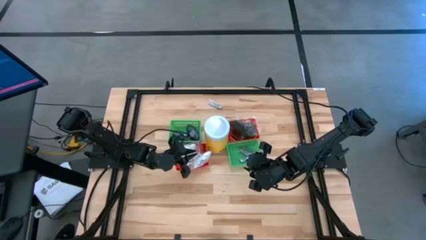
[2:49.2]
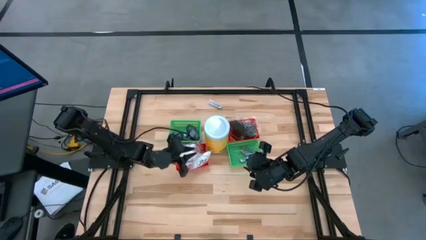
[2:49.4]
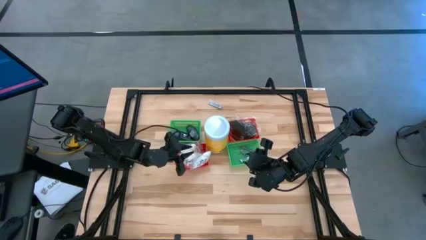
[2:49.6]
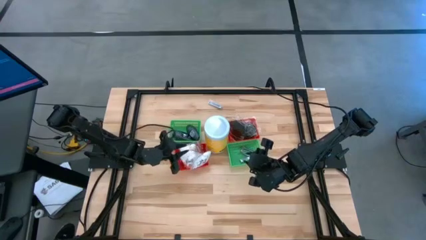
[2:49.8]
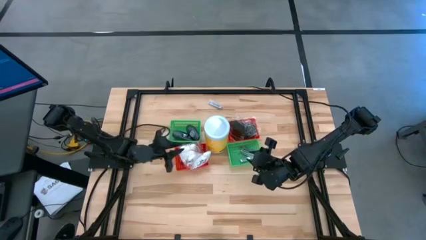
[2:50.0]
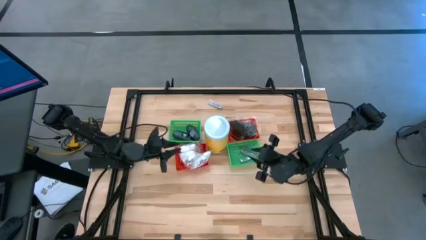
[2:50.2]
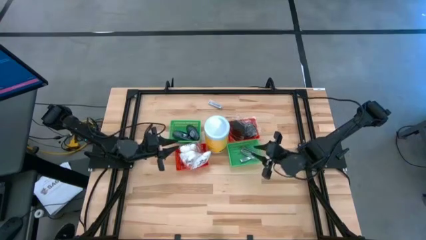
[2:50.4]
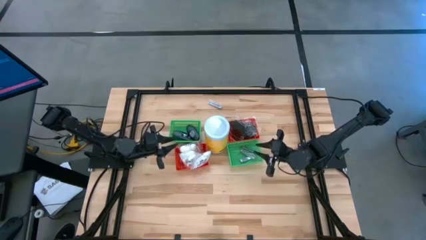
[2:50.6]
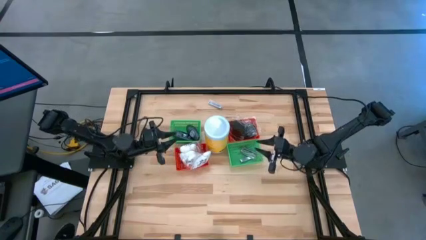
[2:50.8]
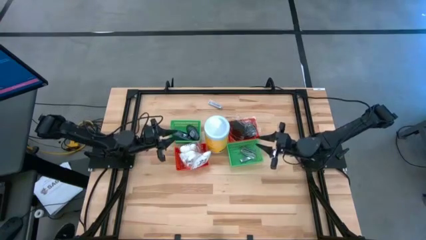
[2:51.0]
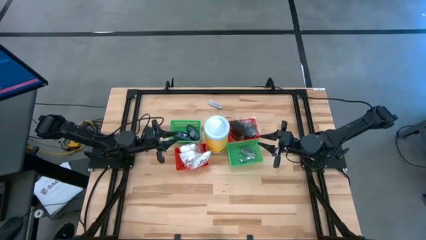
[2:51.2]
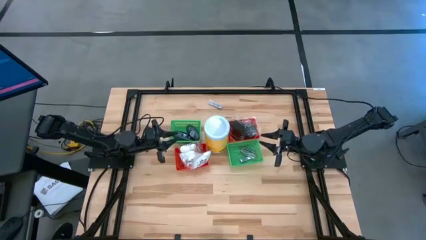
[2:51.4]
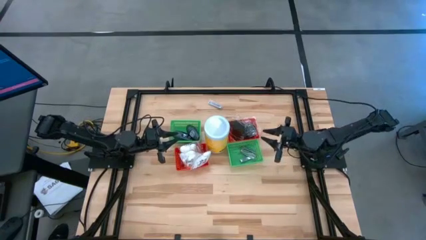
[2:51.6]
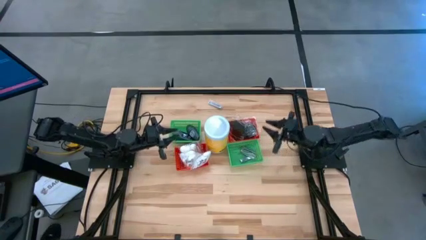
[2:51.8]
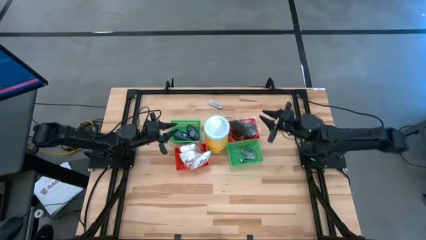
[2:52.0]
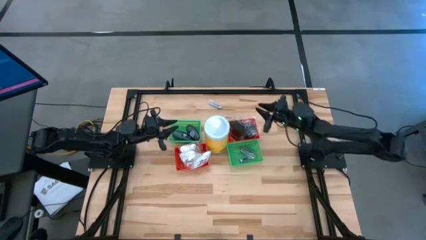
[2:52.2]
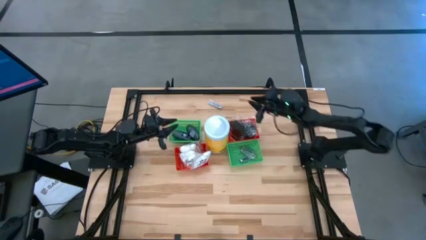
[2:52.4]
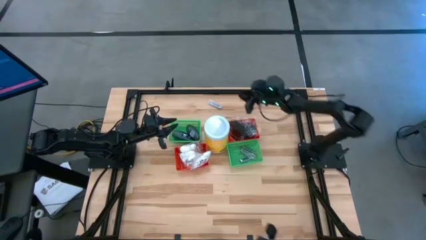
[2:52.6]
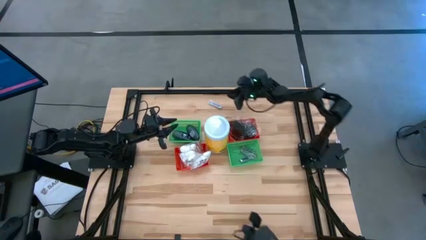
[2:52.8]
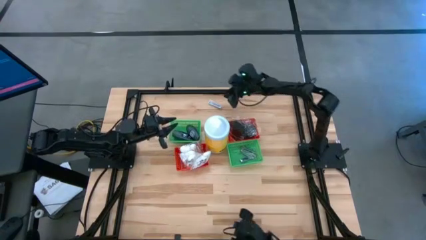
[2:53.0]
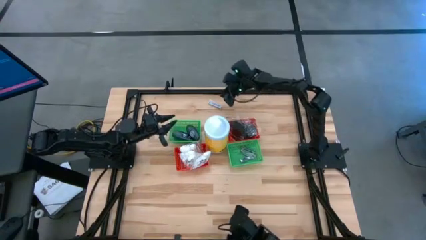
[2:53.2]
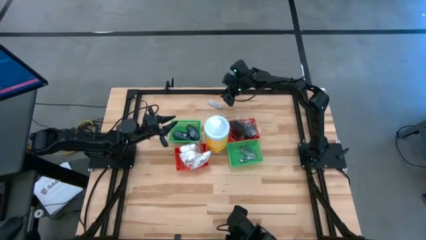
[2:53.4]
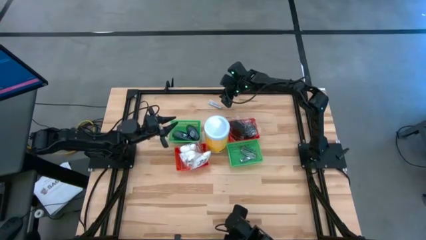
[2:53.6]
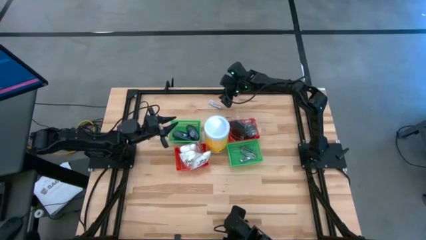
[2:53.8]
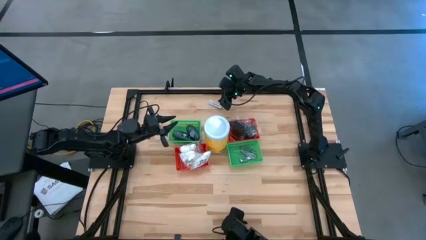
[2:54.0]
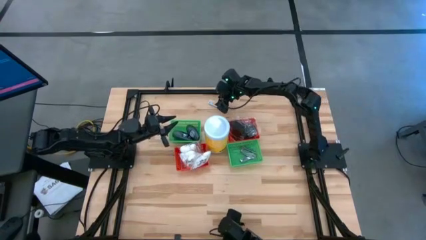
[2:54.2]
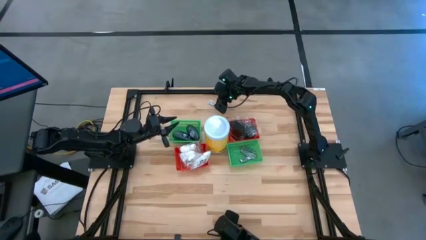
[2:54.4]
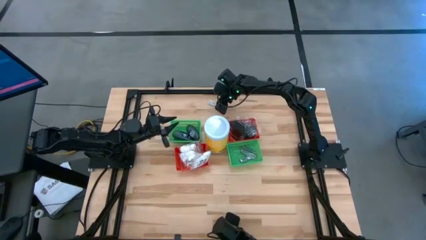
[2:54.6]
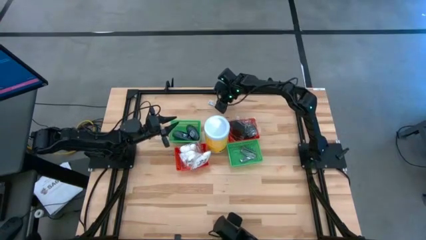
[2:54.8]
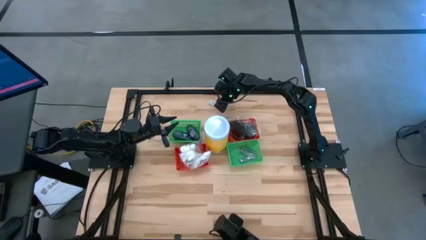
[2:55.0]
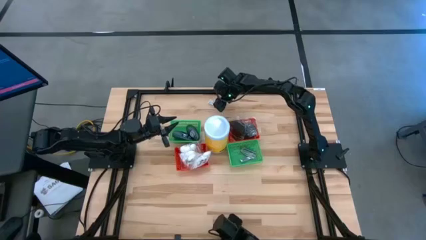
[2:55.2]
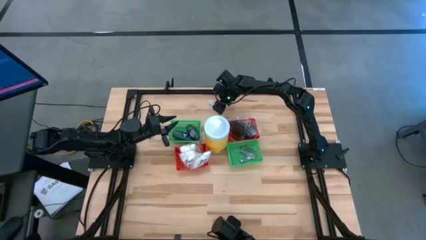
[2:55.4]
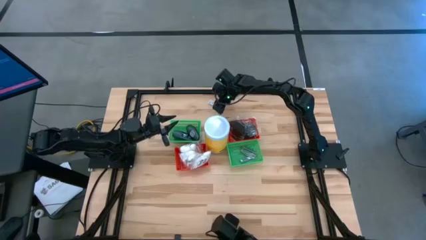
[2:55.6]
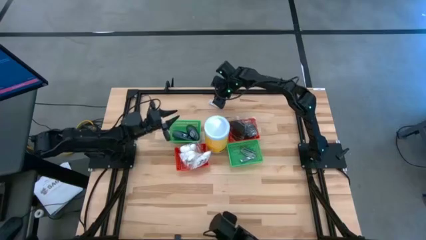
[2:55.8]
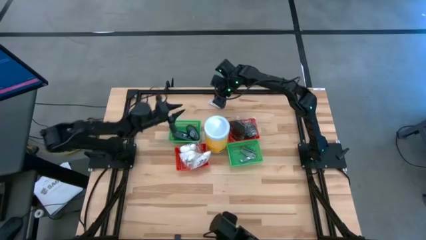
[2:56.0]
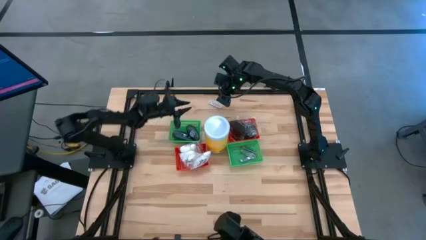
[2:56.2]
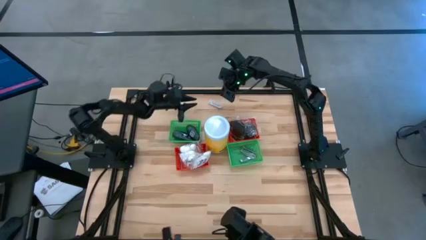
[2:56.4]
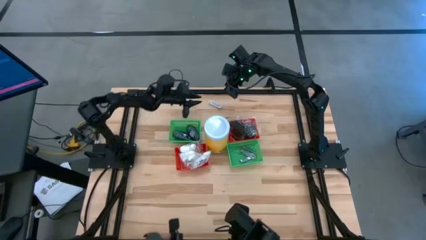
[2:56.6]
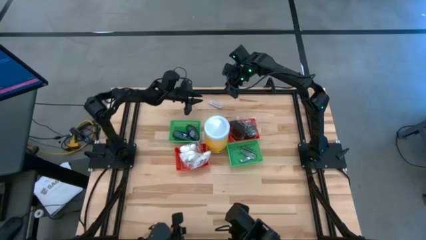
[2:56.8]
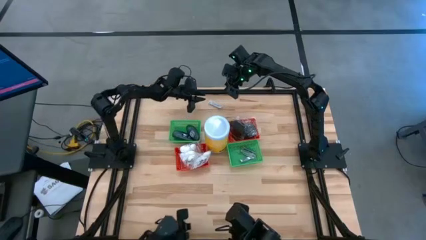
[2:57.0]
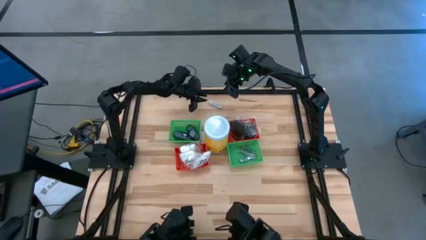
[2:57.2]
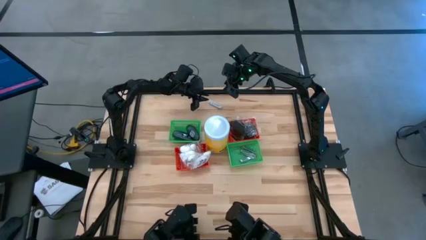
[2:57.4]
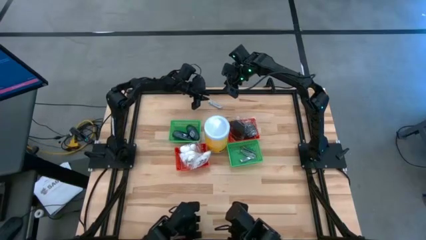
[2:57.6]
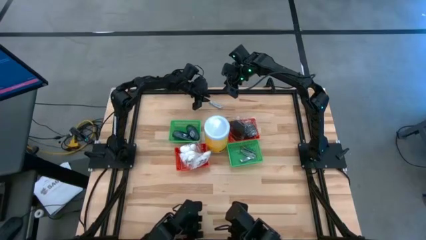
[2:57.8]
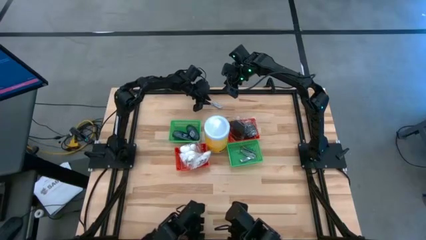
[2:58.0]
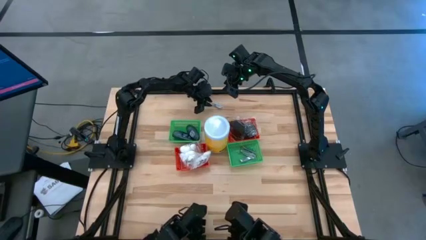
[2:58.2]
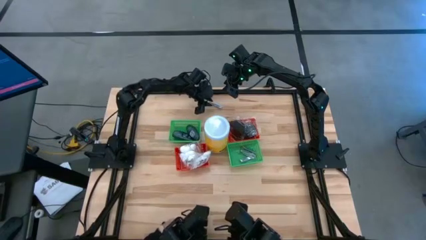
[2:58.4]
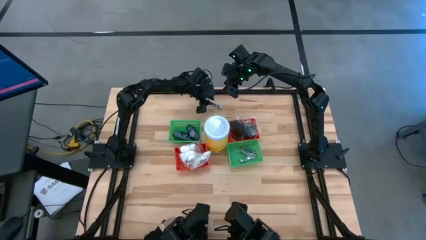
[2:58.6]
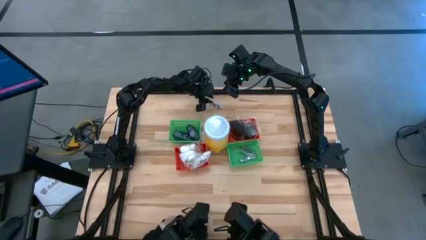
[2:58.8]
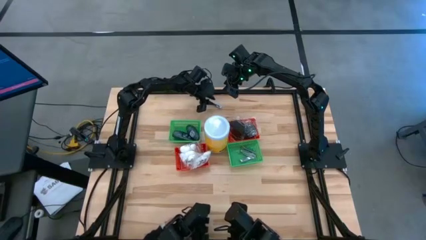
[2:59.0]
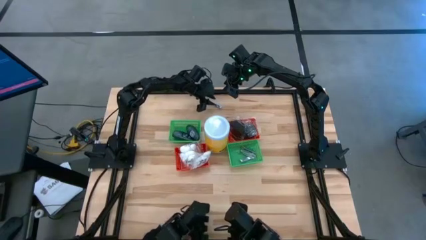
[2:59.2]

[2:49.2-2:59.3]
Task: Pick & Place Travel size toiletries
Put the silver nail cutter into the right green bin

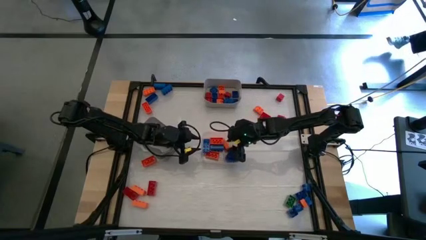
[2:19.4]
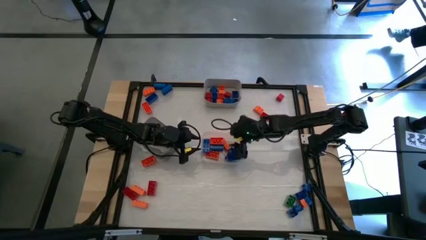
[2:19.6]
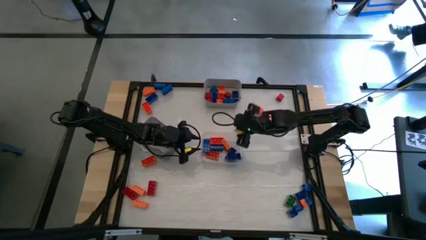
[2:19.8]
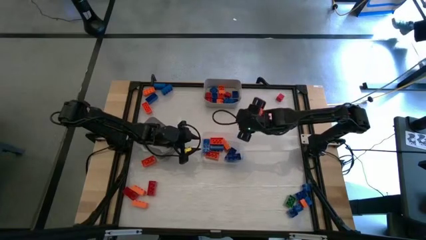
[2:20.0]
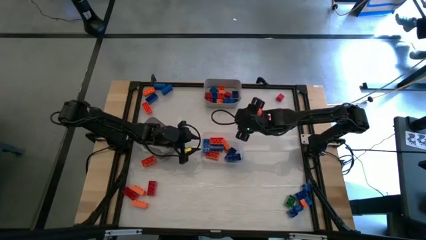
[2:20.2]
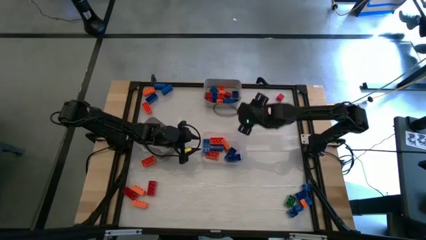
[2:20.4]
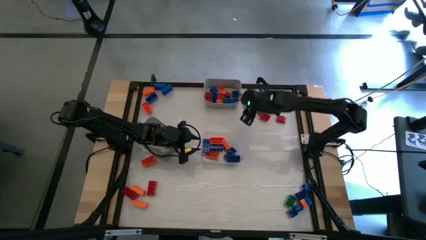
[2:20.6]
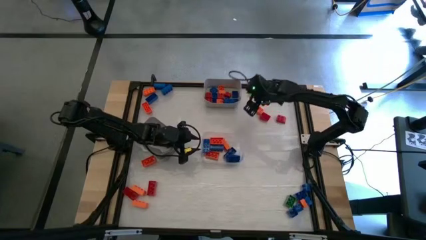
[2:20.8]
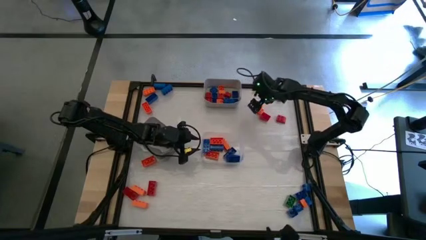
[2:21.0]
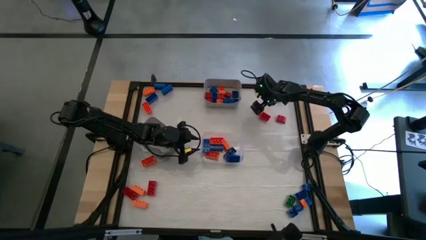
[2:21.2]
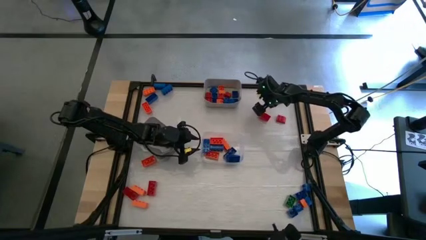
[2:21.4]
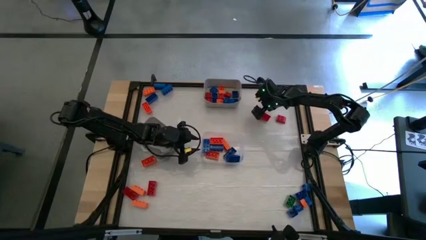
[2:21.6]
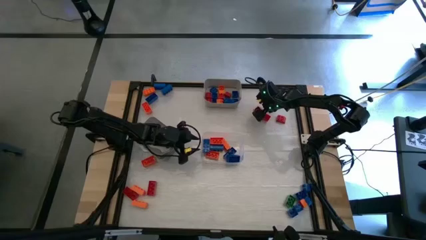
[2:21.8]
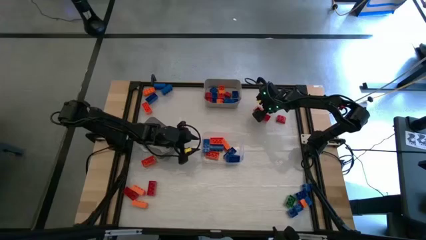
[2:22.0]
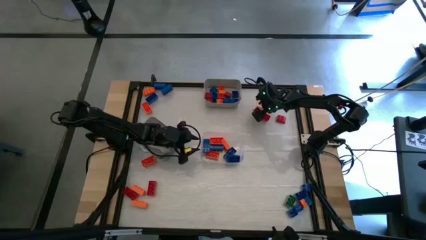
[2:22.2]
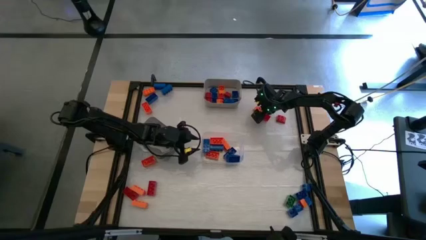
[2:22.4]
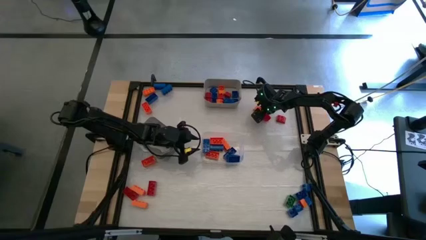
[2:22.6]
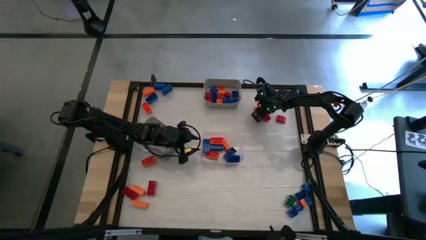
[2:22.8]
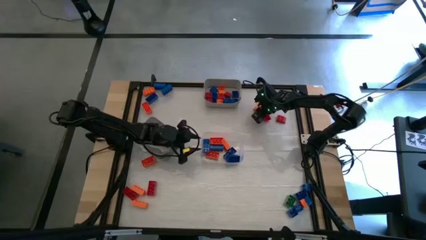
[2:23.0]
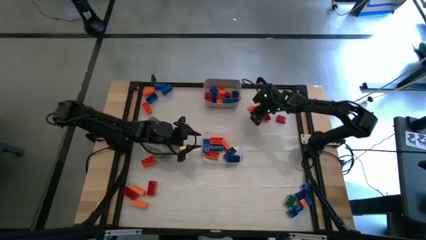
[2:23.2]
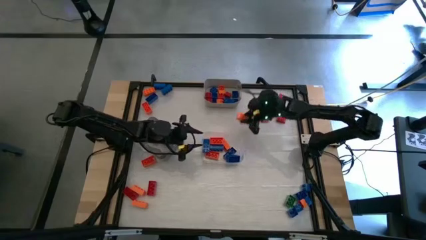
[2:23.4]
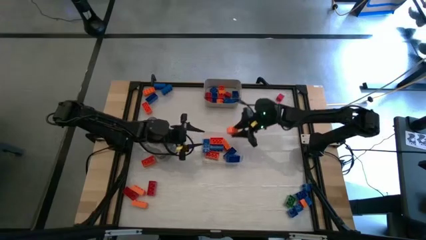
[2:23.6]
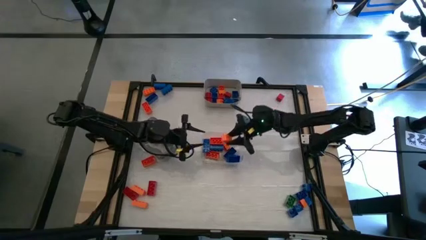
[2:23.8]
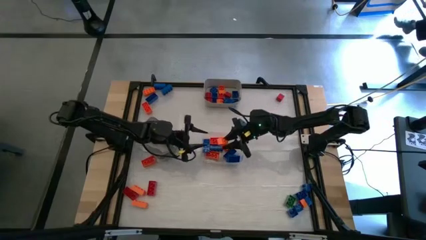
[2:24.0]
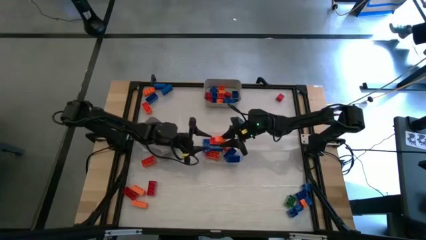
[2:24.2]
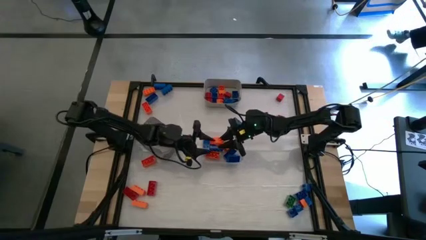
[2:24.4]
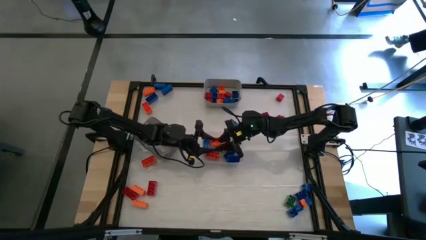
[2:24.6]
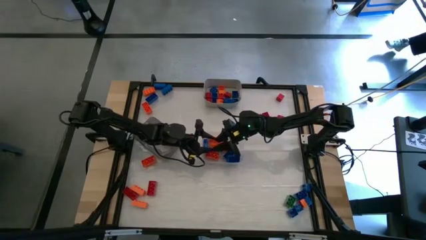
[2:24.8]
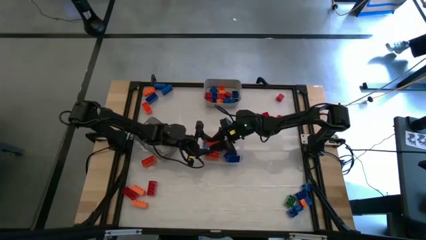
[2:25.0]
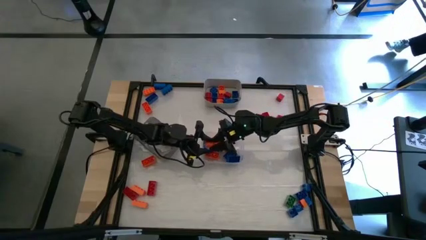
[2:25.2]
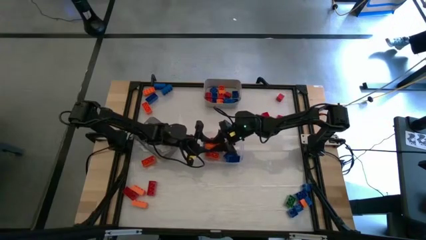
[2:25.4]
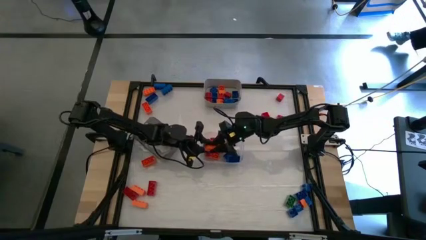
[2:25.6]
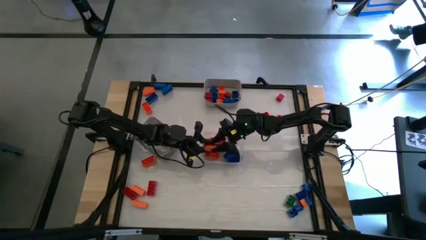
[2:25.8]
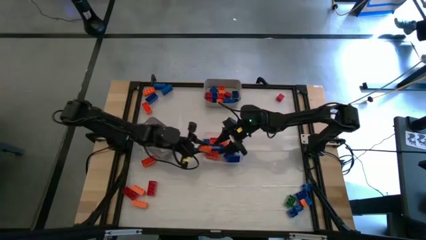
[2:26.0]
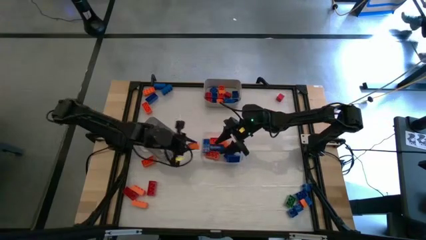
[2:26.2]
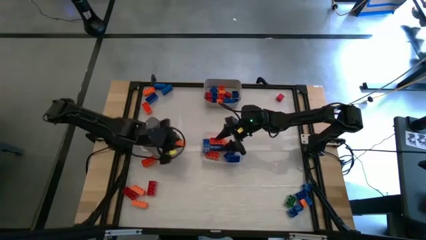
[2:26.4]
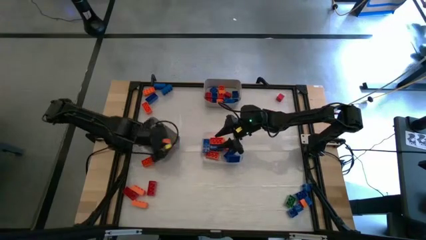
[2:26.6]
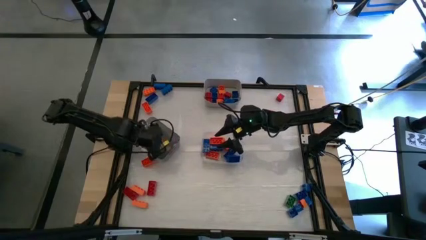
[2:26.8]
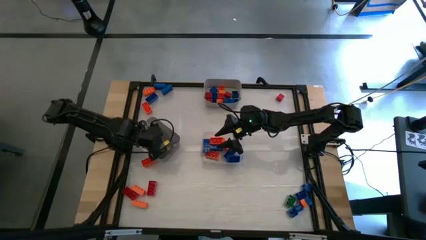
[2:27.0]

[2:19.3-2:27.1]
Task: Sort blocks by size
Put the orange curved game piece into the black bin
